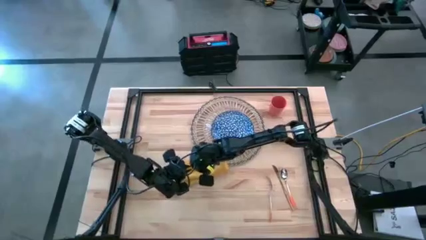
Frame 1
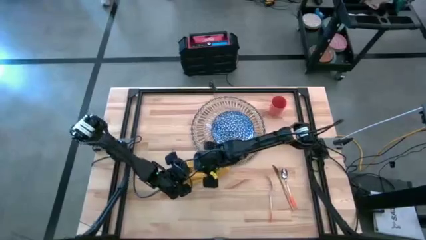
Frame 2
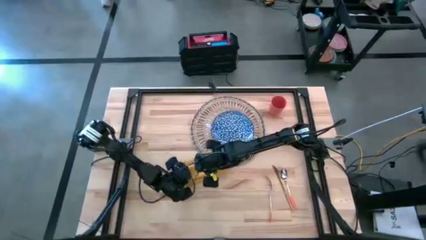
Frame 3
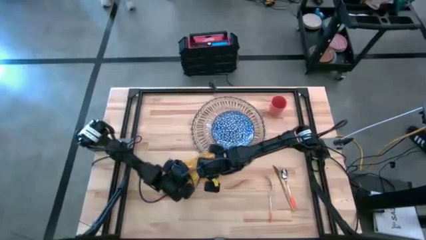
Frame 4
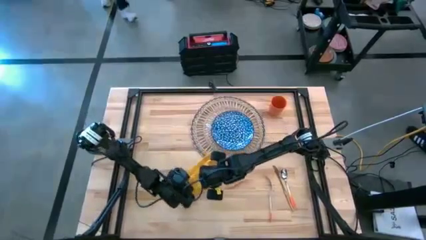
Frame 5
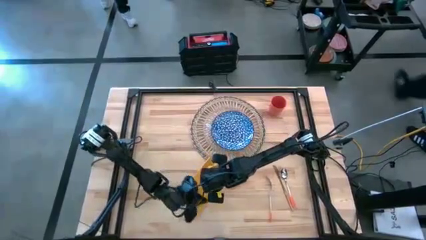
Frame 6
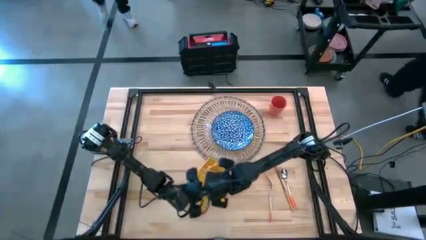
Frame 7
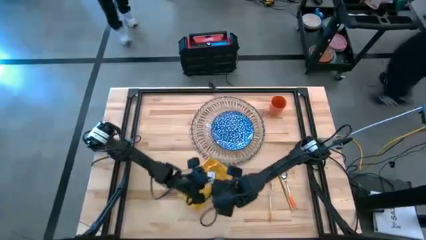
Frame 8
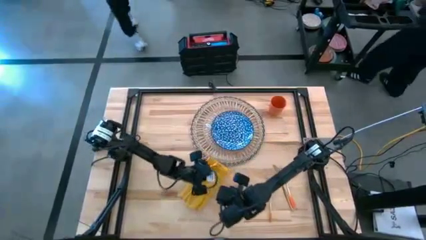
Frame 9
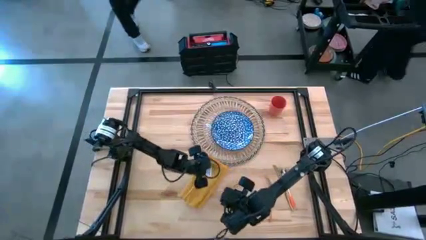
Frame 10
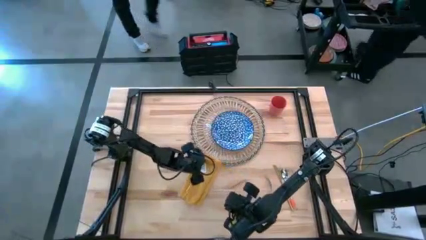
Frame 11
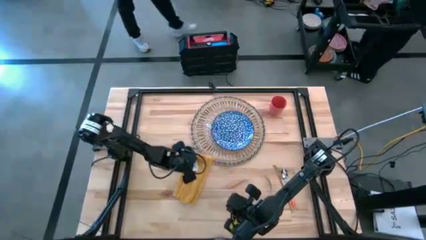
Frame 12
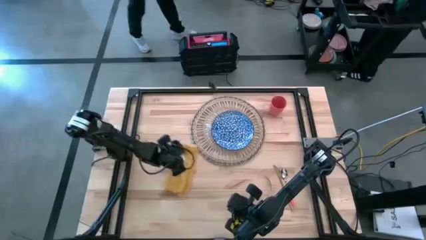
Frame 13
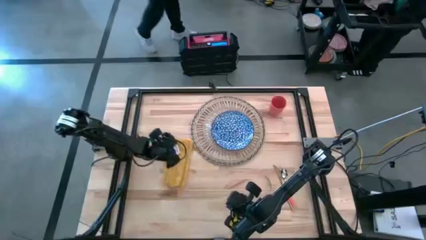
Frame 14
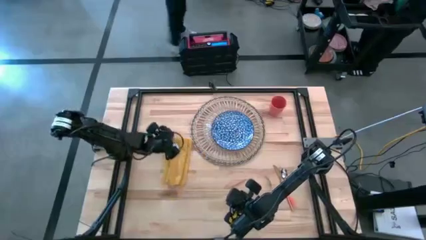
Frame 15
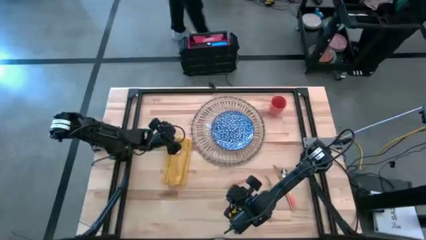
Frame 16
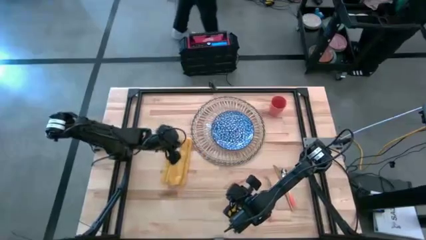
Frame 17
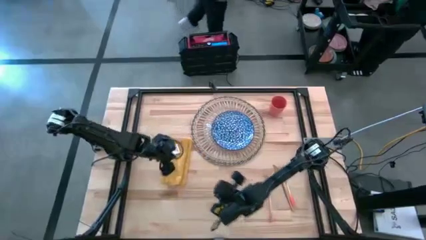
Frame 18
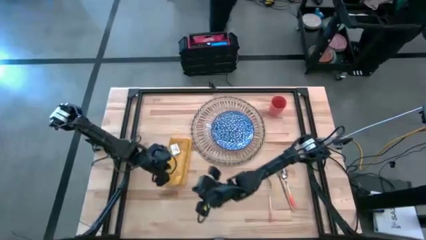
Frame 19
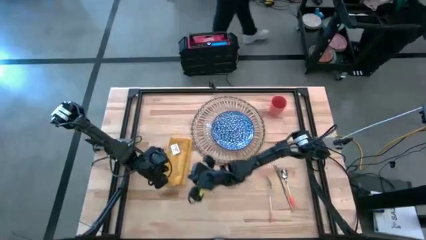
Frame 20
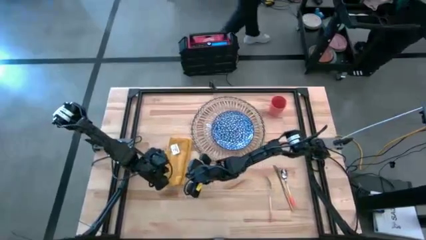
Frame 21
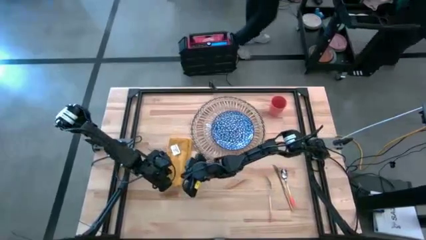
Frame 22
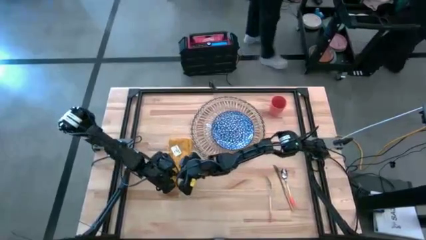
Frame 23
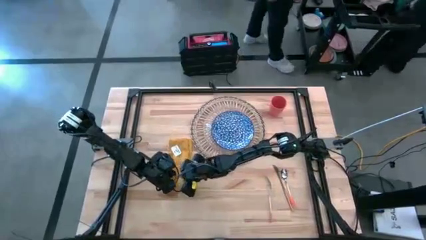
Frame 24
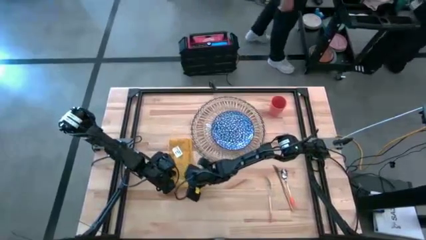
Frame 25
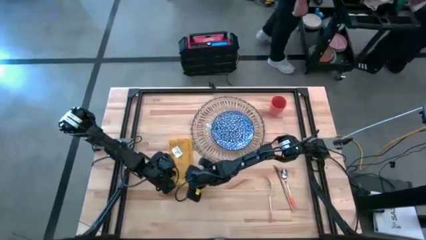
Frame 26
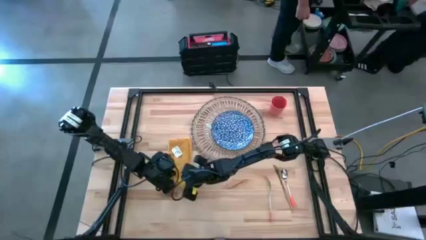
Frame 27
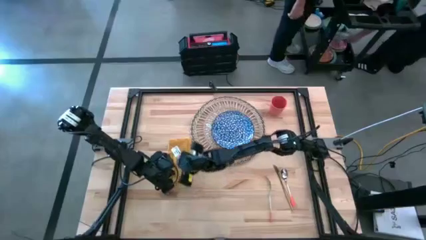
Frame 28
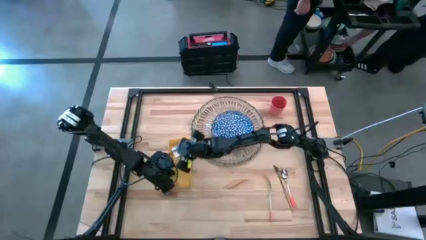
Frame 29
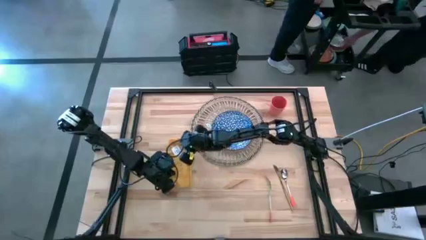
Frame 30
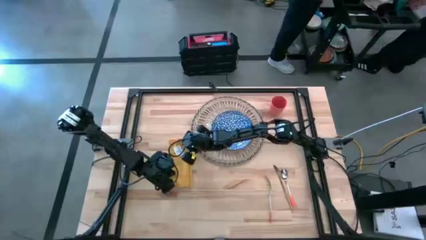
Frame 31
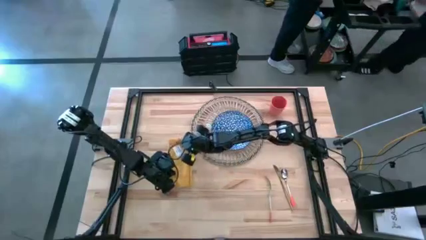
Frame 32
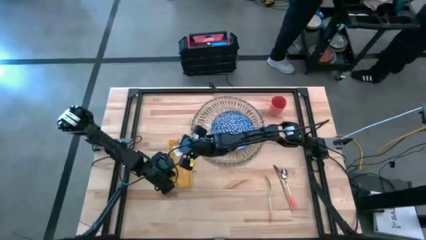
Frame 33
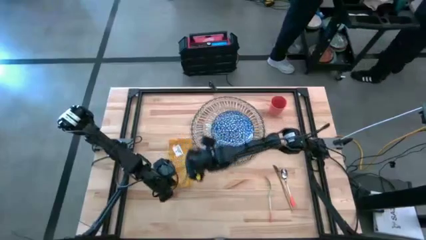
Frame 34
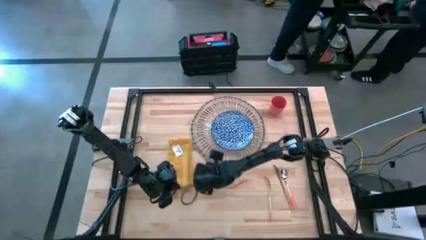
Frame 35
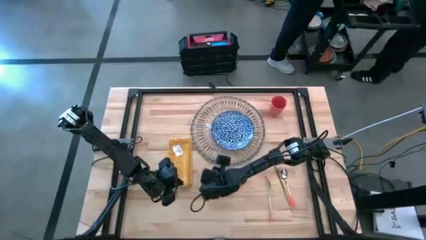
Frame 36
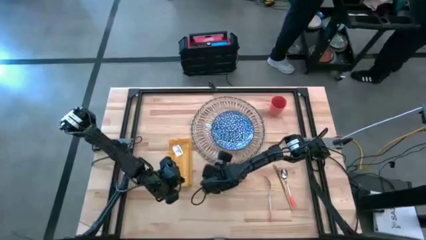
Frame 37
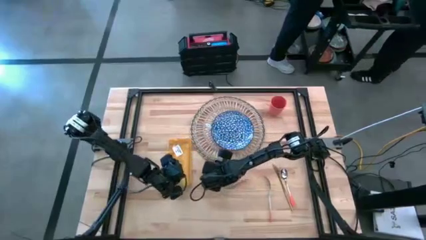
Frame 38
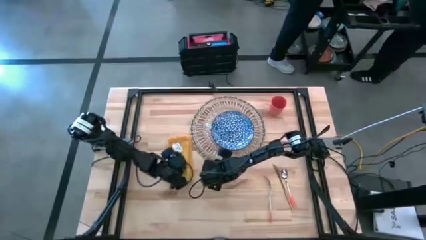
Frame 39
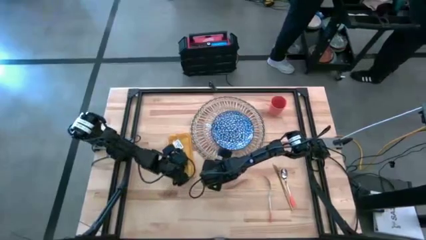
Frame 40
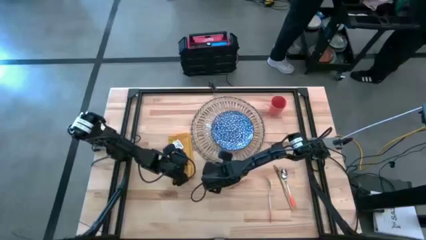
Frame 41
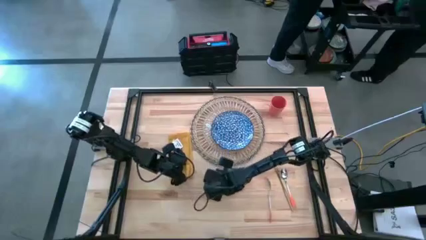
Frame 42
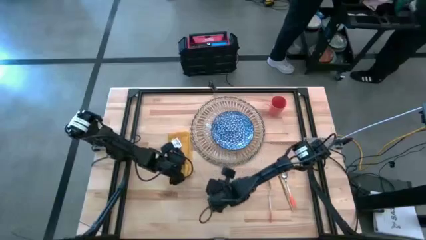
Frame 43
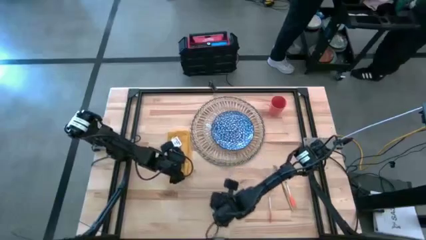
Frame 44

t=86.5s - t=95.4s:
Task: Set table place
Put the yellow table napkin aligned to the left of the brown placemat

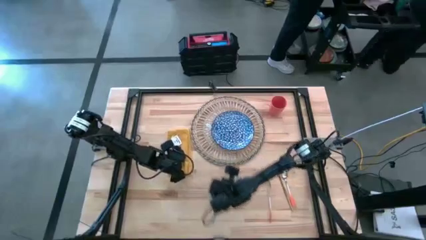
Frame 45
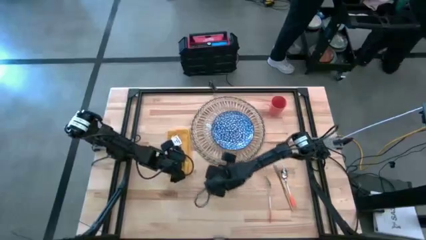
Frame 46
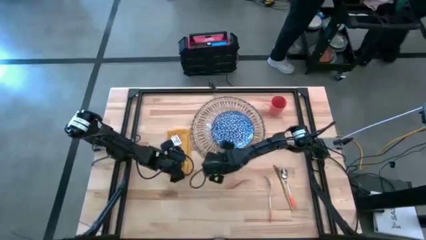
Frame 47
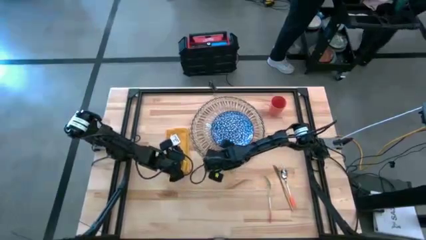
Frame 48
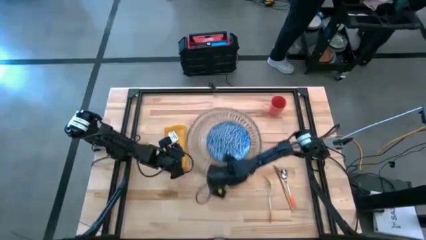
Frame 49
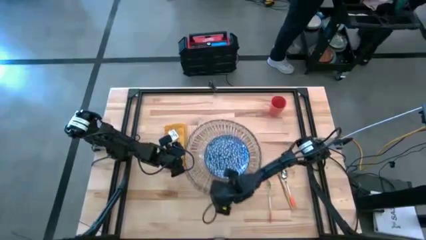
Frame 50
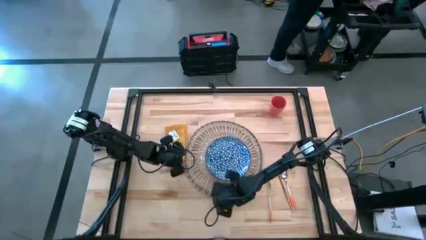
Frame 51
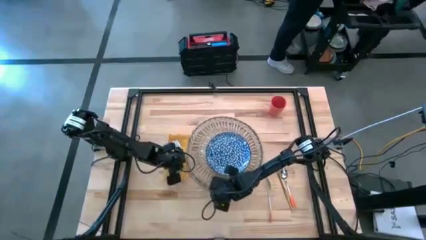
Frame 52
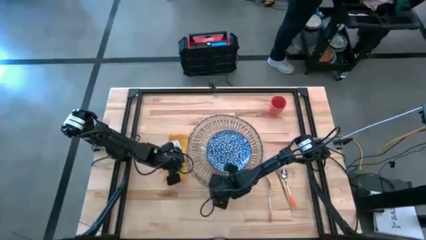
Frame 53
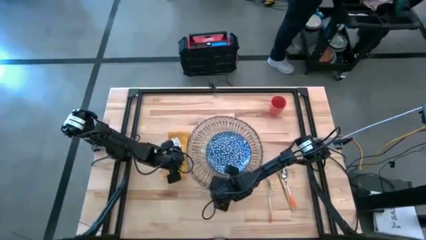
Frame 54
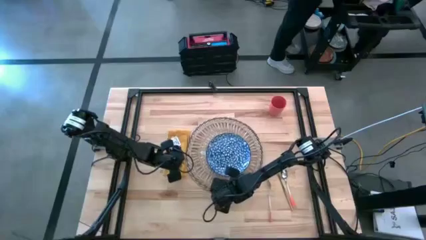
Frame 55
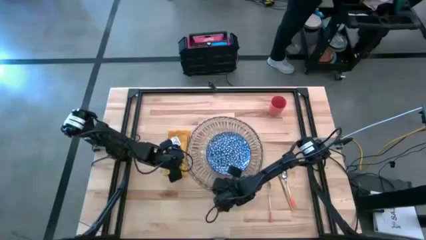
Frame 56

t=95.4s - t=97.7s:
Move the brown placemat to the center of the table

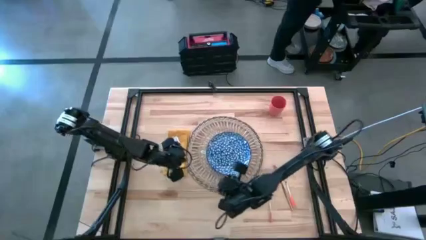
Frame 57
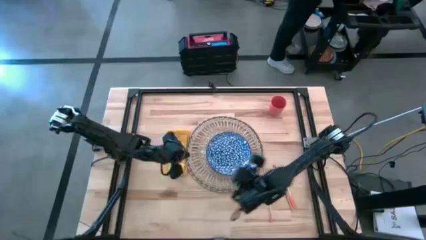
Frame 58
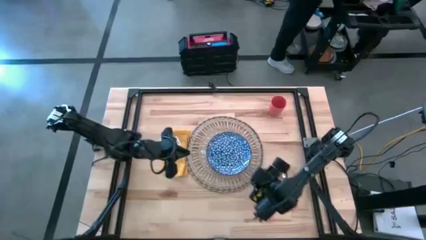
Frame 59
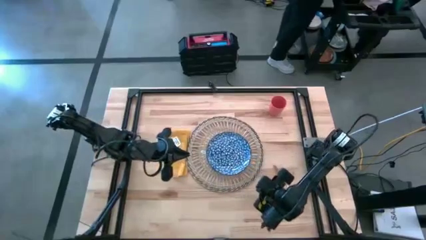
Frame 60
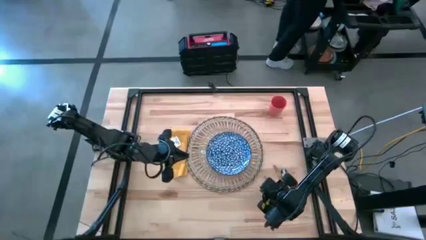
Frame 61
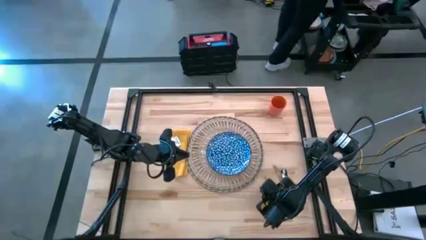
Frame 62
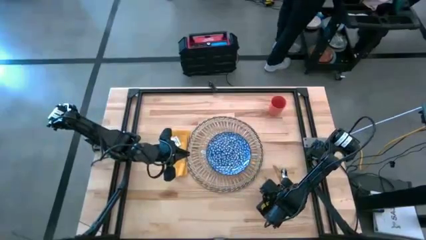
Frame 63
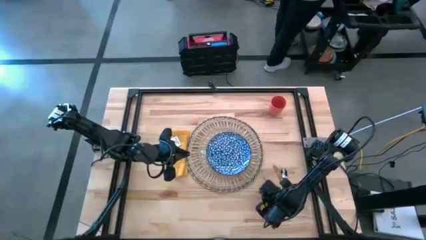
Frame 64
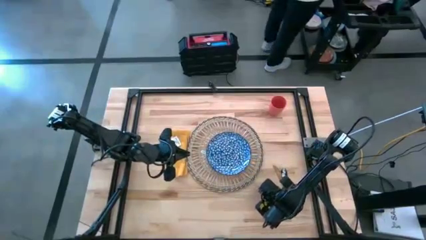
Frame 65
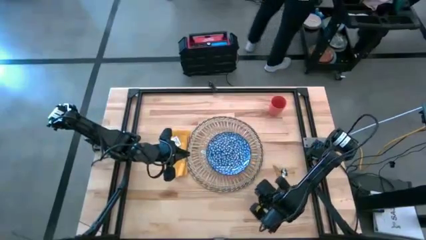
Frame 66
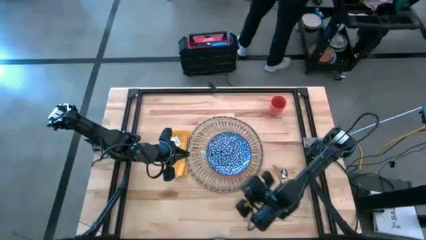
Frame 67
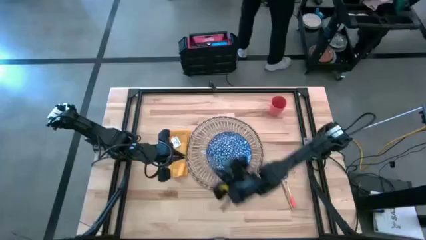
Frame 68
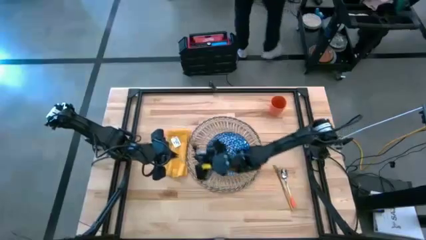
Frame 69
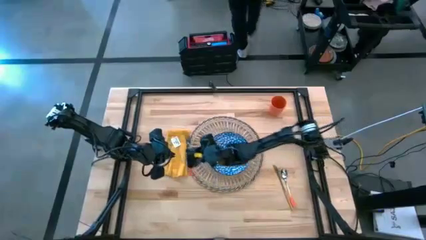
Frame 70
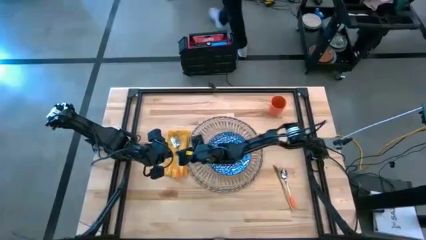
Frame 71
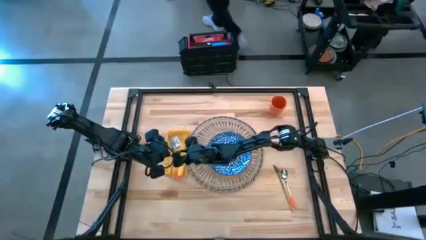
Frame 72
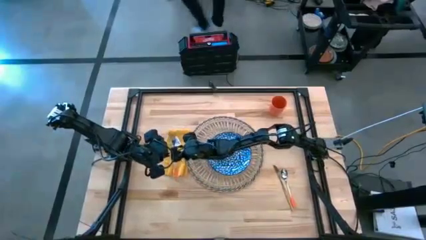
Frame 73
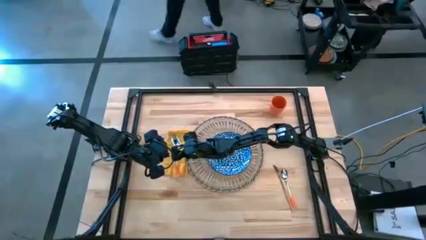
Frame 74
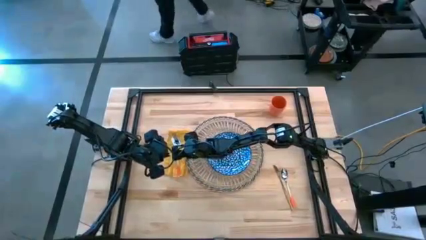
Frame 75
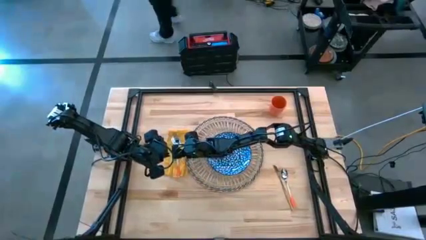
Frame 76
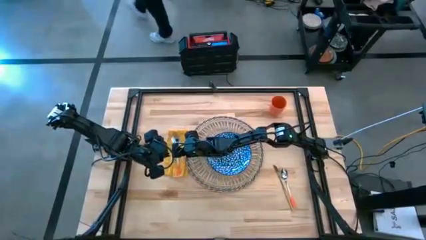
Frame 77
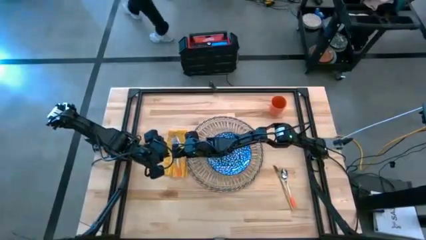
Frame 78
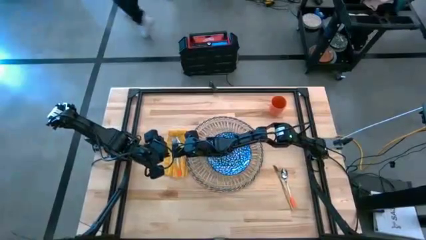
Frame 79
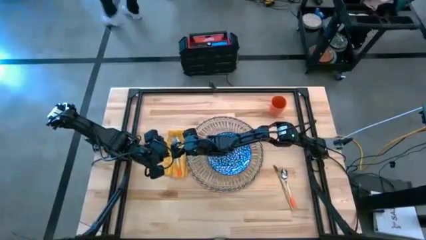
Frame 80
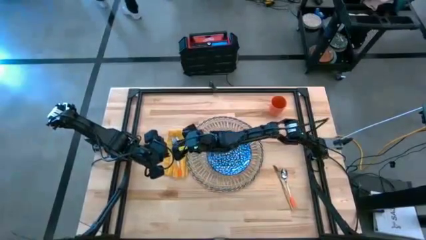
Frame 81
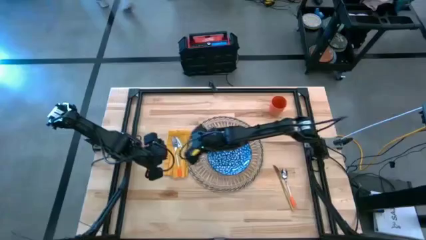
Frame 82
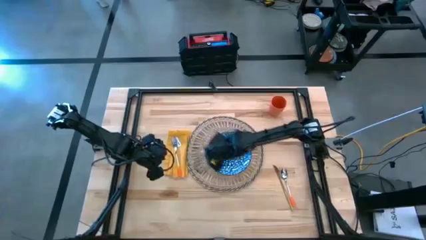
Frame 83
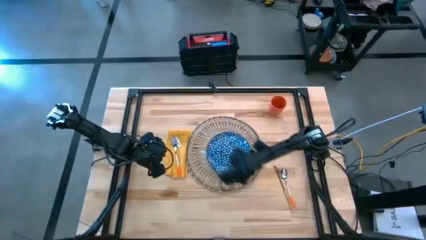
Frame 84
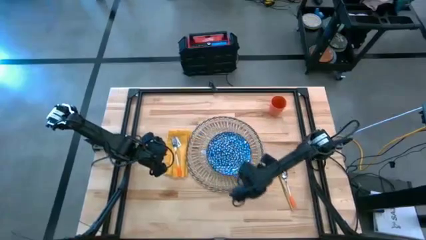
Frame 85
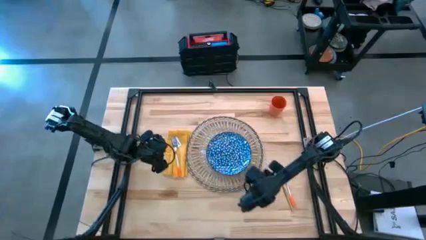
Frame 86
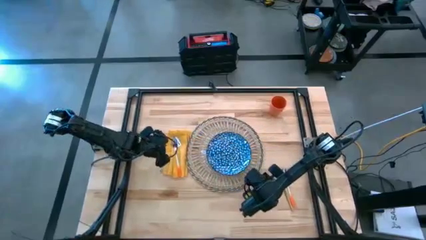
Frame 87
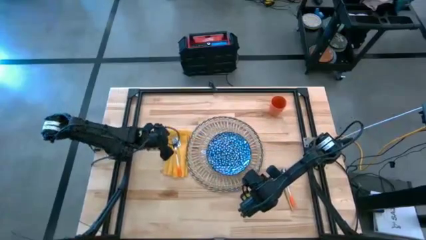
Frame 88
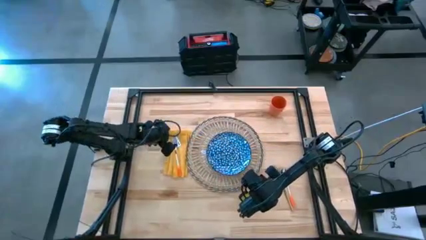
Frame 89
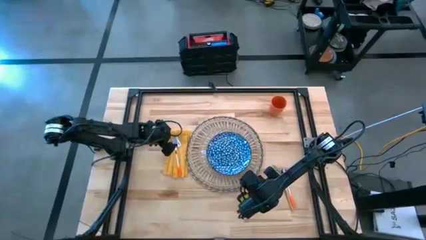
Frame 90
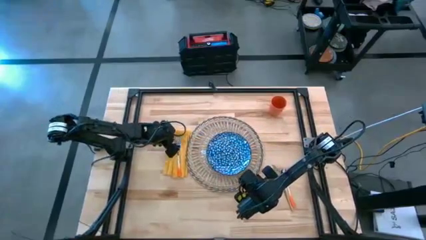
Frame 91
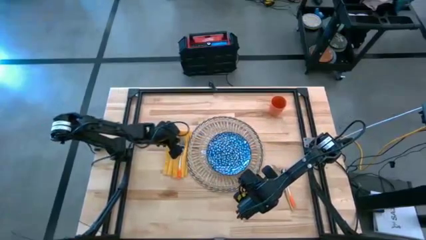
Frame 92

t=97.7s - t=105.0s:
Put the orange fork on the yellow table napkin
